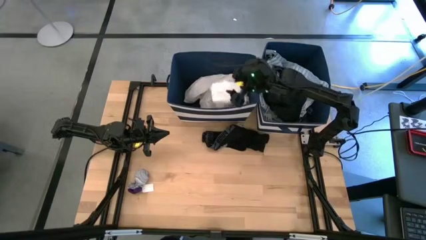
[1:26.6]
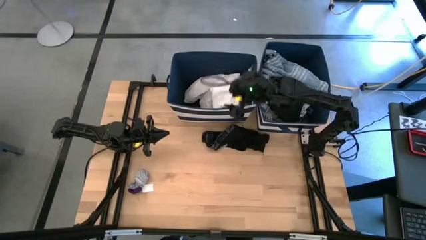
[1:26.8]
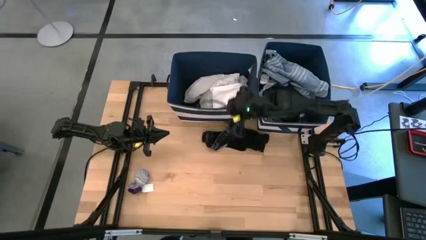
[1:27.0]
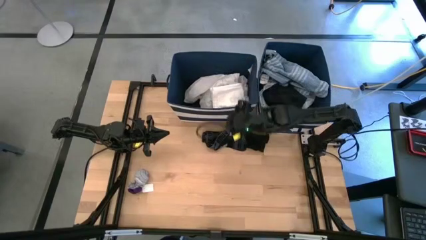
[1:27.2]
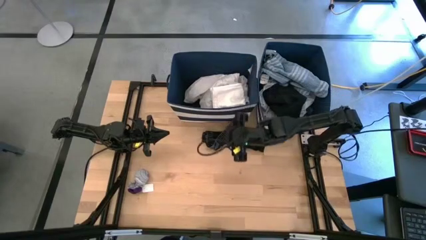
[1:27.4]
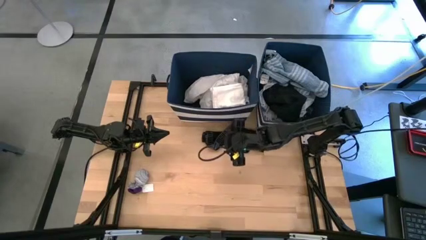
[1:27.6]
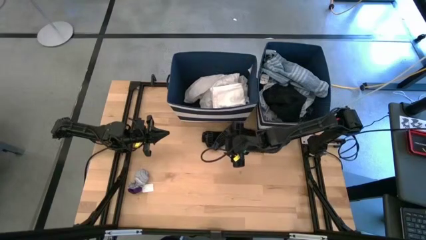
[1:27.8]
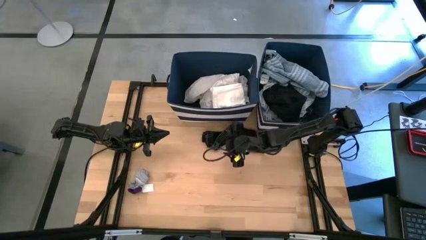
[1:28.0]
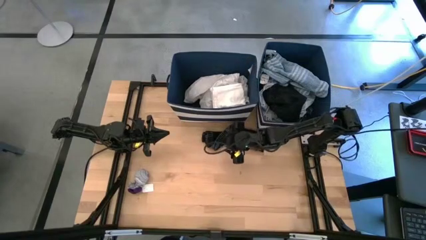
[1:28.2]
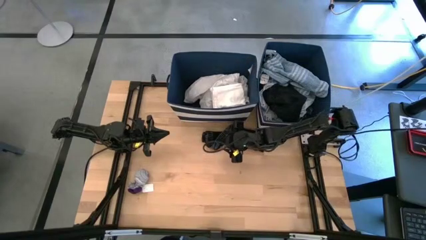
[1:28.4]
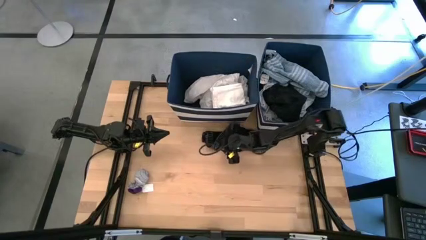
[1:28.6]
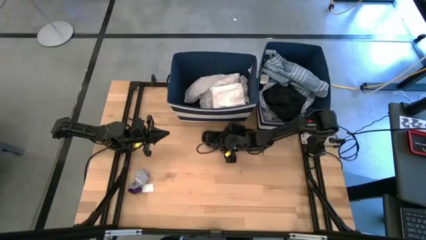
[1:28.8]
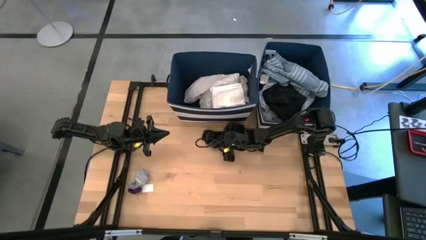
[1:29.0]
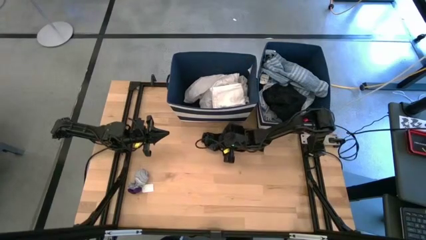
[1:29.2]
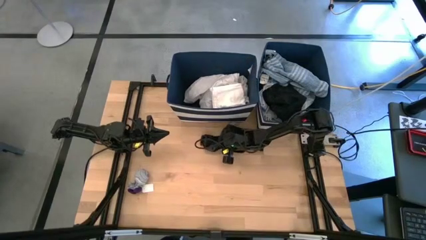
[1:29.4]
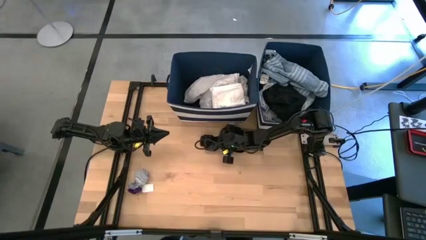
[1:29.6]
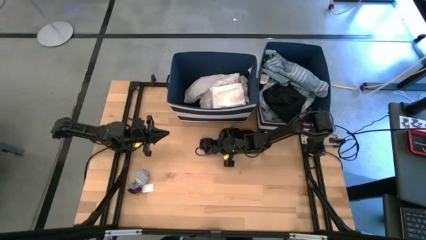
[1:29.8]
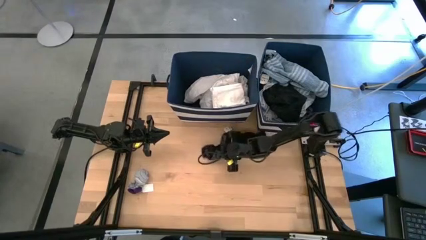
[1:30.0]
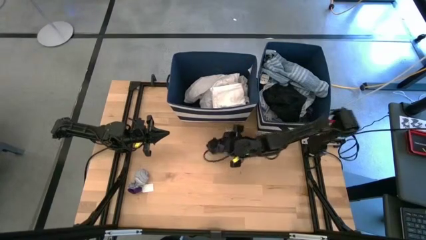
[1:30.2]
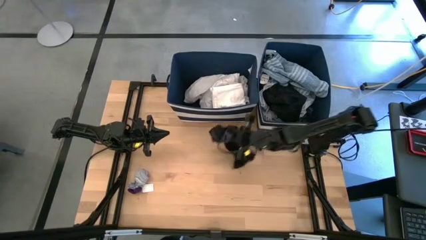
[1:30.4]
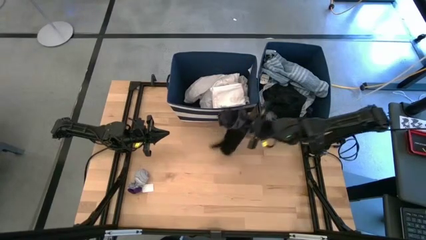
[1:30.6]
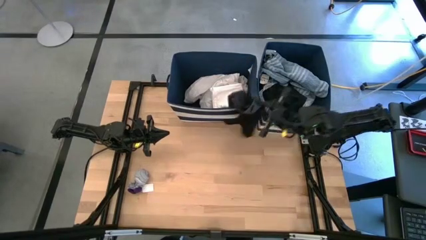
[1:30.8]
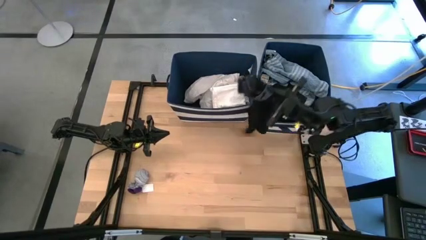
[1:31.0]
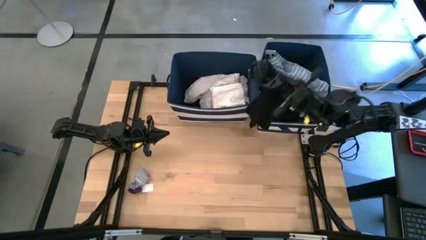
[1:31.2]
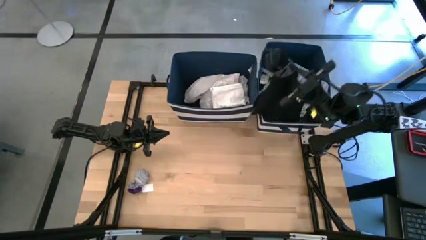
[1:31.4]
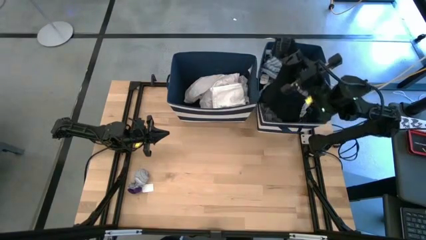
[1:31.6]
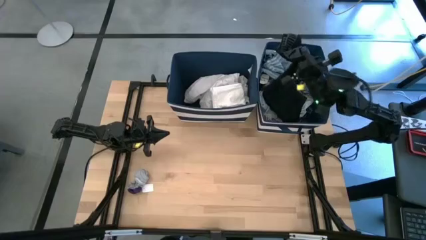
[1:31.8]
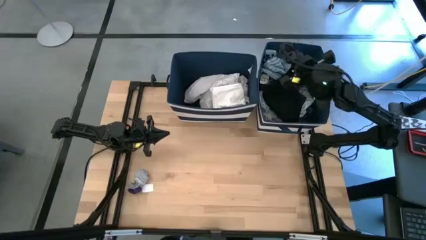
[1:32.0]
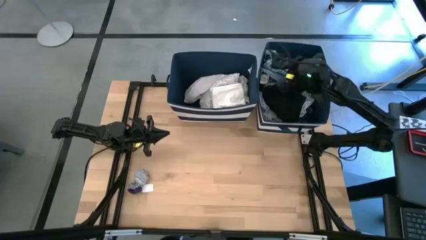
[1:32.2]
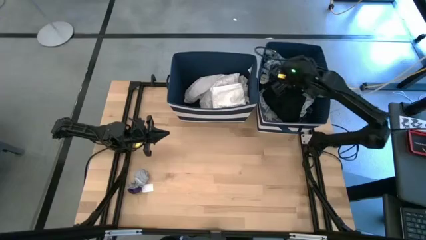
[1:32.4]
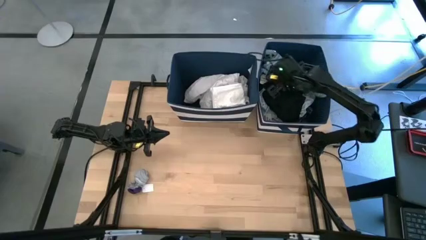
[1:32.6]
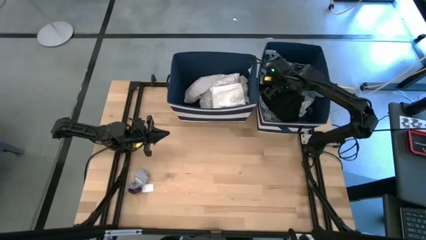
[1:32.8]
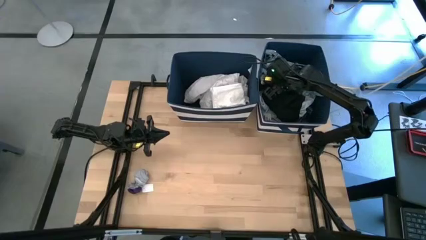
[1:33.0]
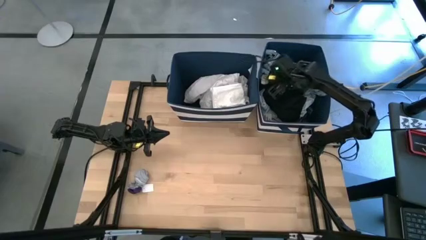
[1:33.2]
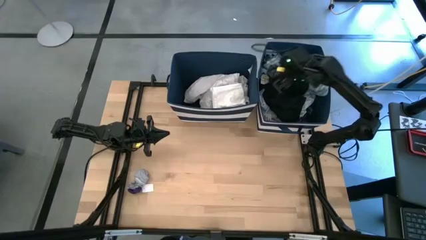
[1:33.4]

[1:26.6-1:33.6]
Task: Sort clothes
Put the black underwear into the right blue laundry organizer

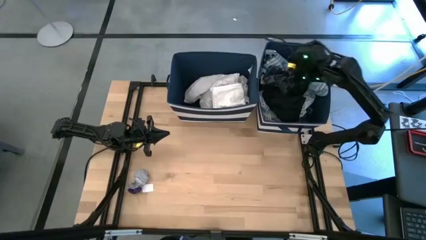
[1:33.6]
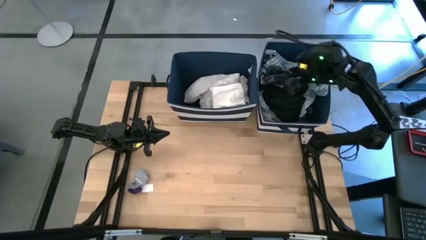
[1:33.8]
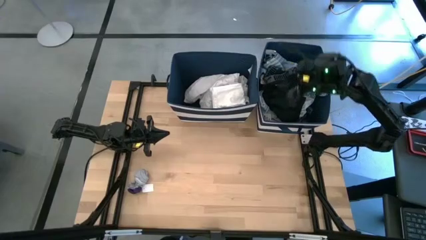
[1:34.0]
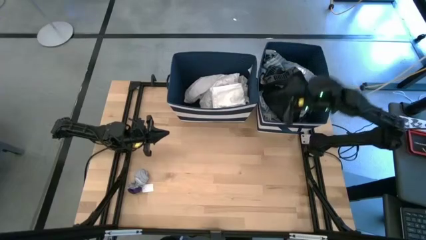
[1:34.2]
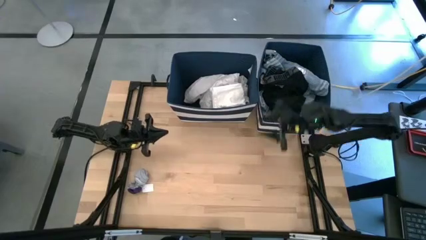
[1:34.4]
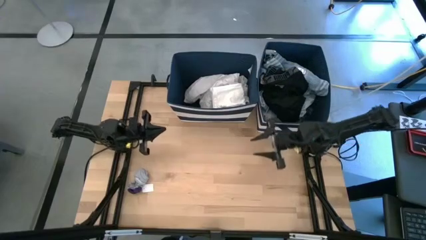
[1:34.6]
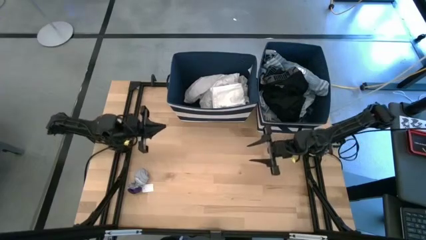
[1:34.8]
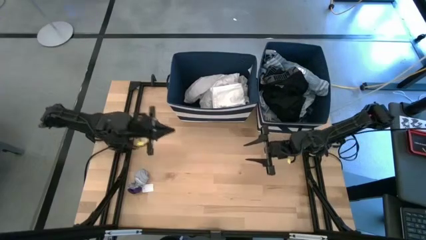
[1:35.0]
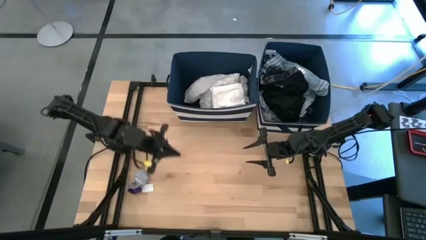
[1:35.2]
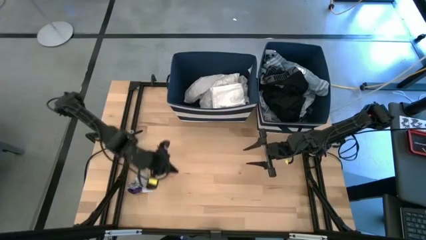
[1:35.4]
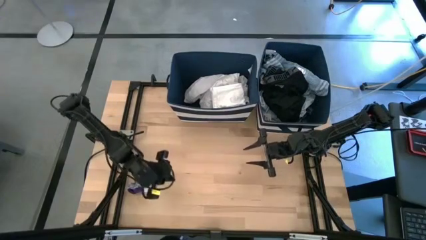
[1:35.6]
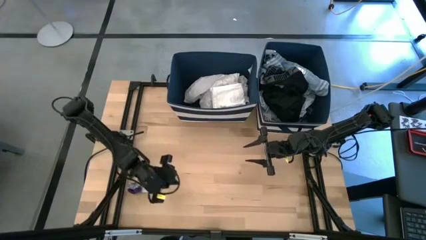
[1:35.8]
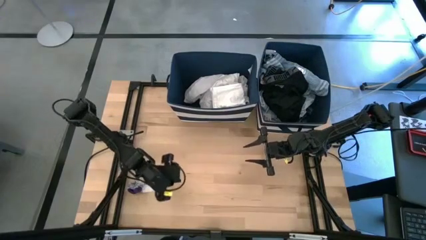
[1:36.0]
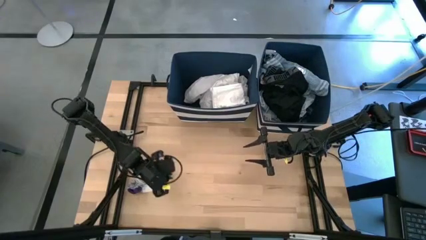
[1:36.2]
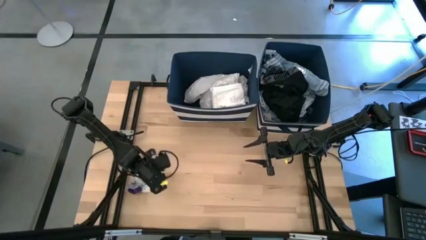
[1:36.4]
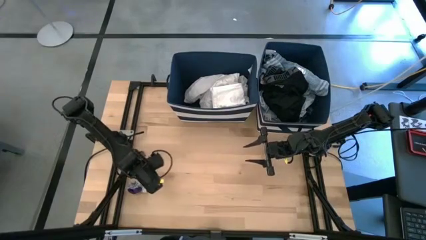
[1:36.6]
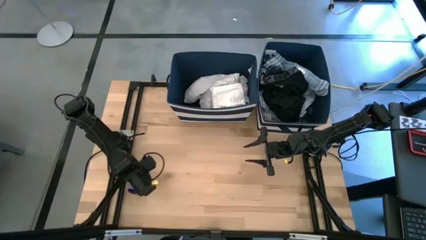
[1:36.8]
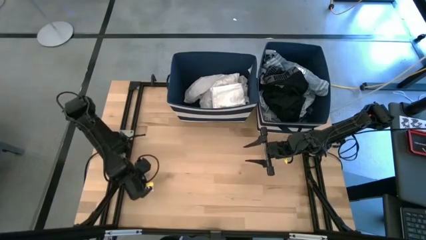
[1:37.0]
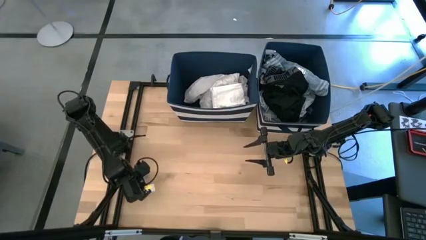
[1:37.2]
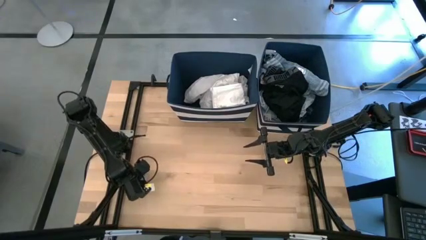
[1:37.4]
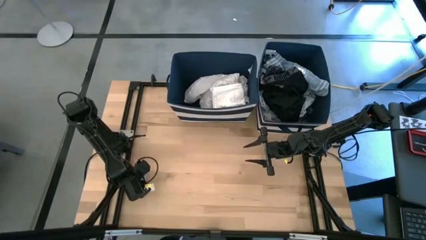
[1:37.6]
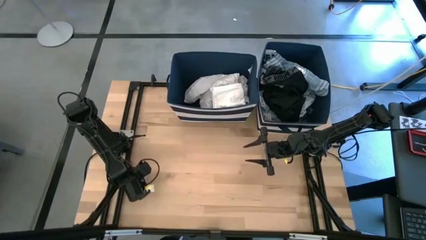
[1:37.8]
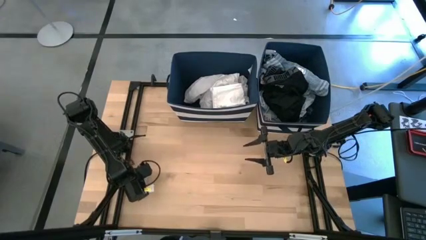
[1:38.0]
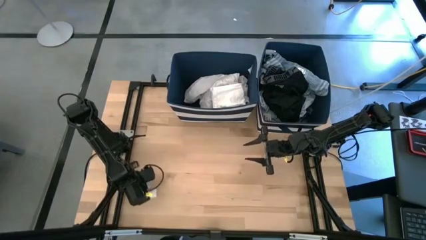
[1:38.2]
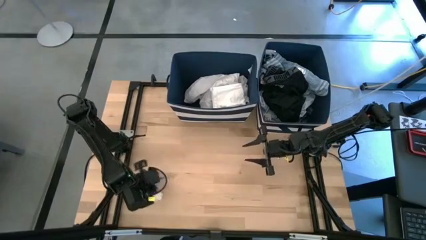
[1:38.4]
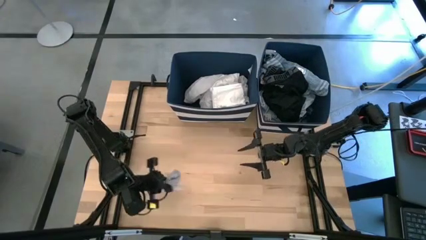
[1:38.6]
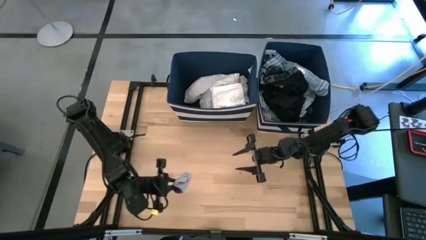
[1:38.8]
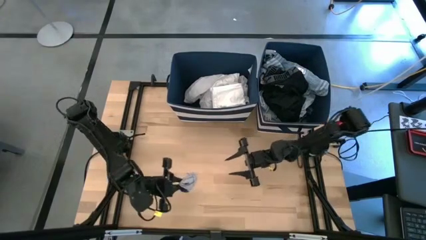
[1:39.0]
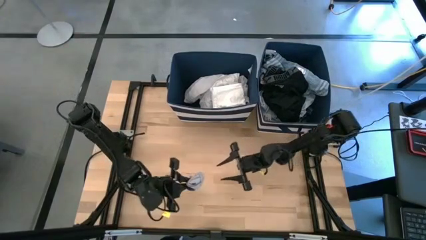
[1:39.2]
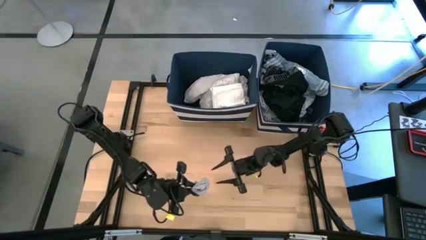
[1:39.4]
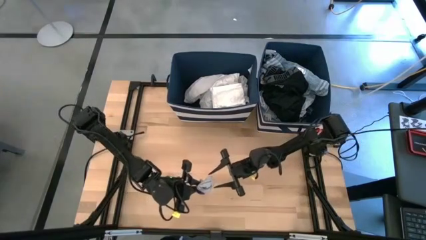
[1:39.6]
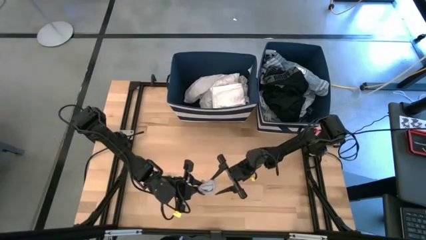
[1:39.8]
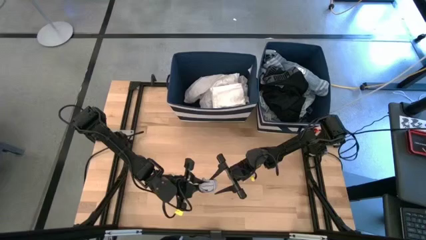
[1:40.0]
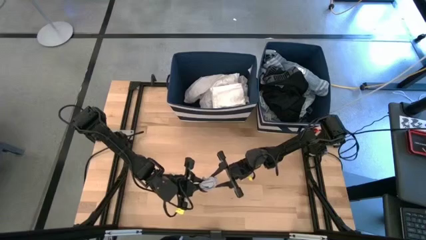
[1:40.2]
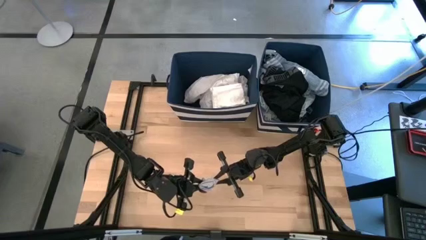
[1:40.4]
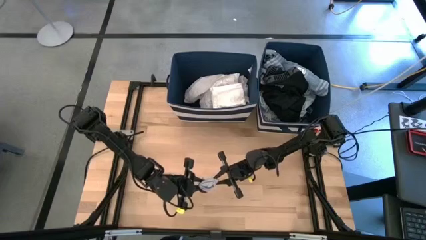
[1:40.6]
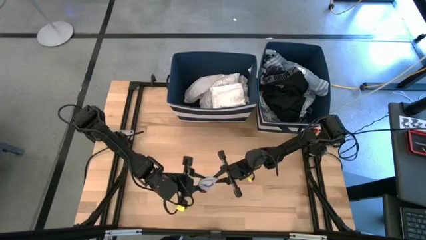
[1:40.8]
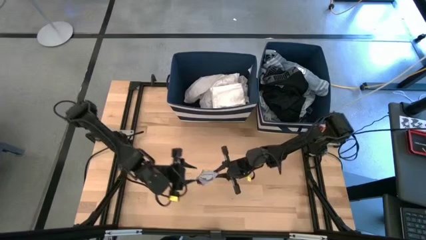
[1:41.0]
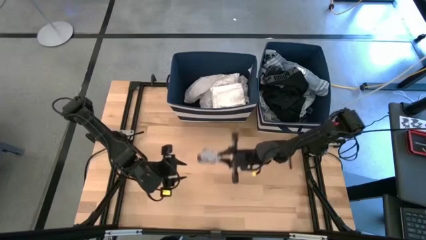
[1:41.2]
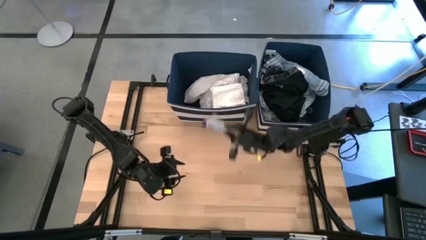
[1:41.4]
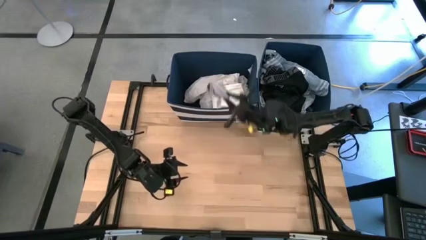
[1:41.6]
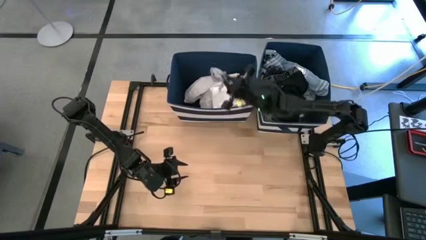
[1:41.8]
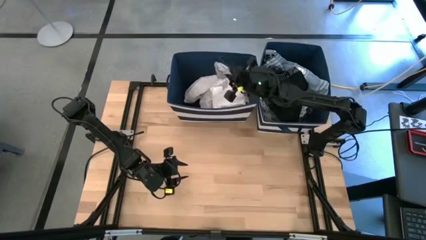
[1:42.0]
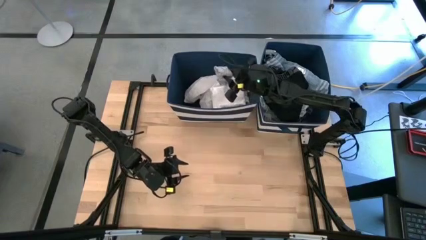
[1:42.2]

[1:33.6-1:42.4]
Put the gray socks into the left blue laundry organizer
